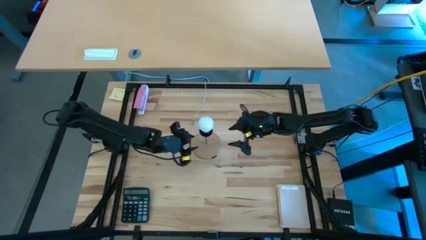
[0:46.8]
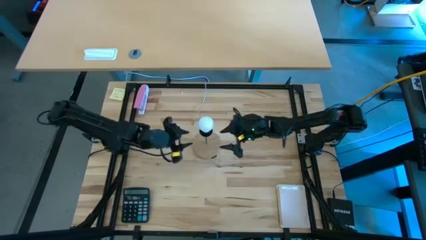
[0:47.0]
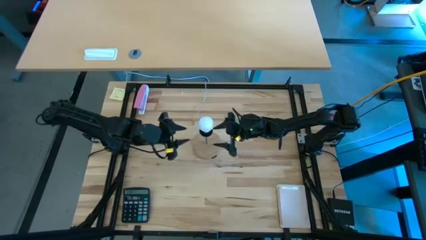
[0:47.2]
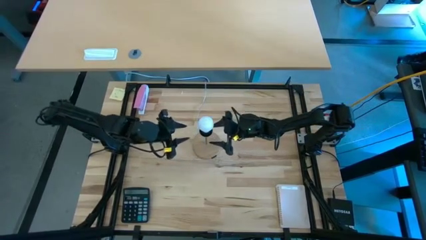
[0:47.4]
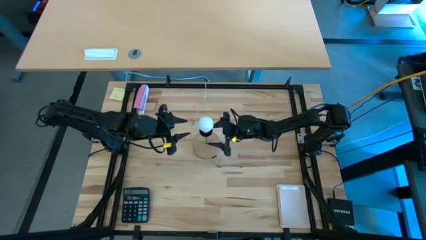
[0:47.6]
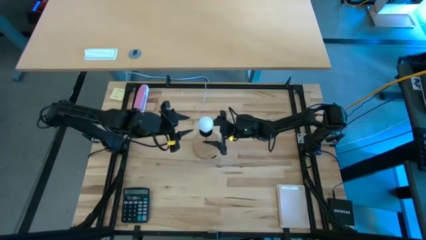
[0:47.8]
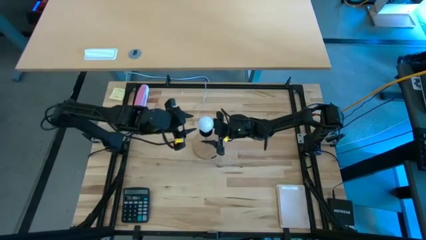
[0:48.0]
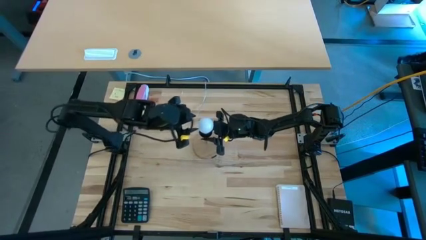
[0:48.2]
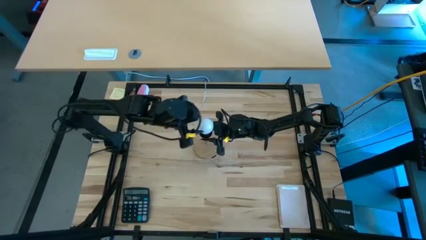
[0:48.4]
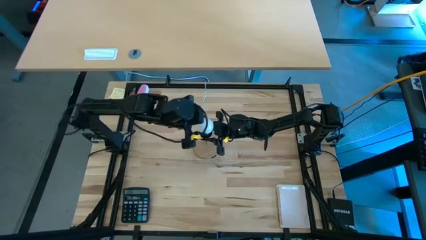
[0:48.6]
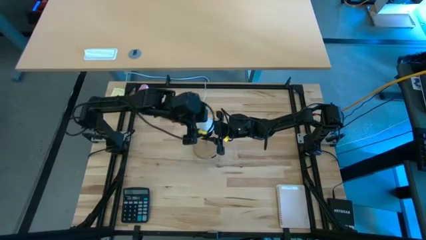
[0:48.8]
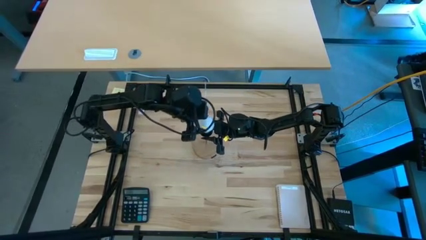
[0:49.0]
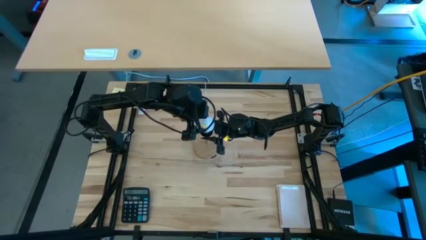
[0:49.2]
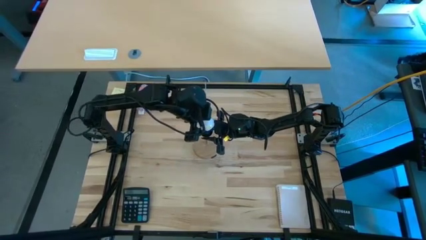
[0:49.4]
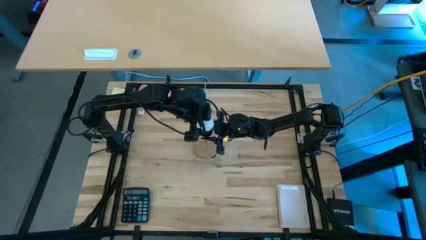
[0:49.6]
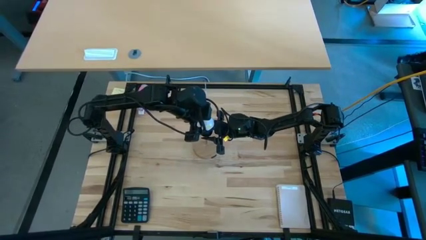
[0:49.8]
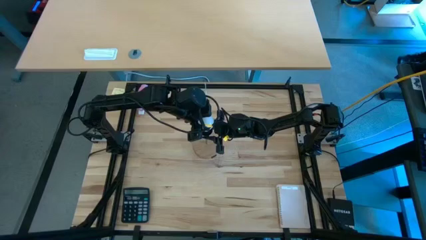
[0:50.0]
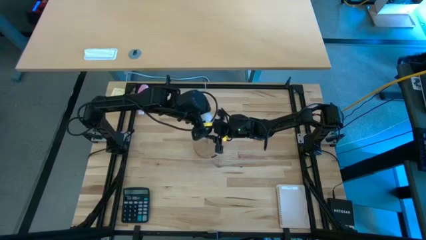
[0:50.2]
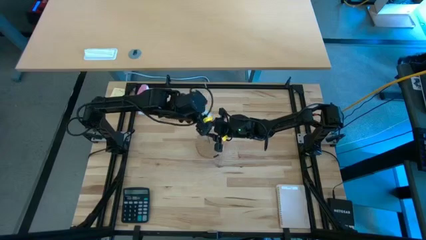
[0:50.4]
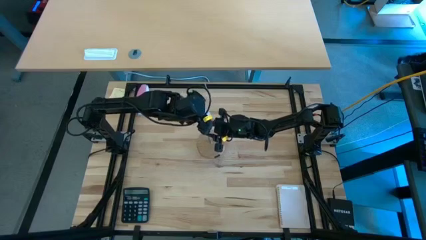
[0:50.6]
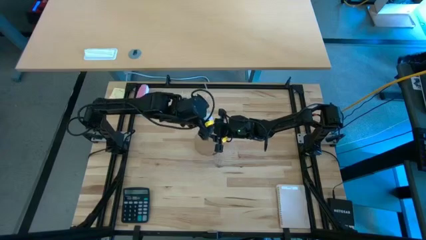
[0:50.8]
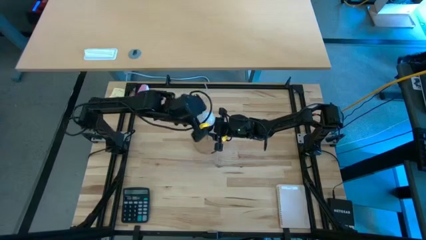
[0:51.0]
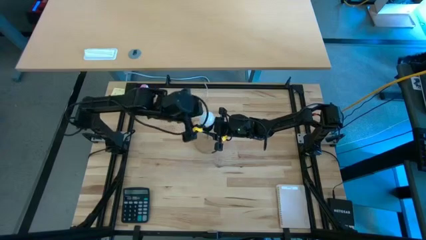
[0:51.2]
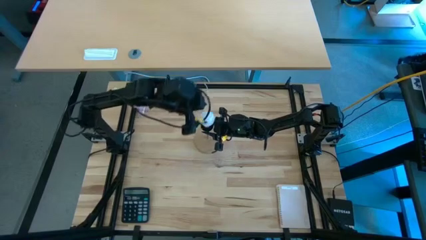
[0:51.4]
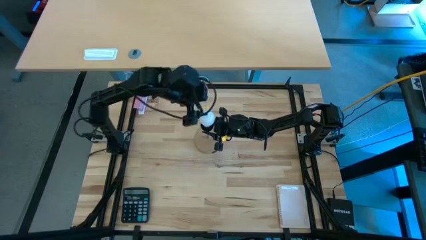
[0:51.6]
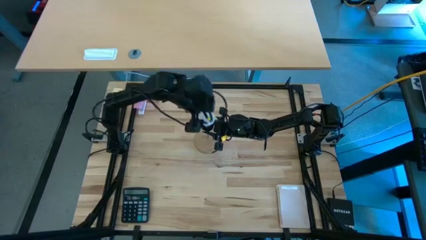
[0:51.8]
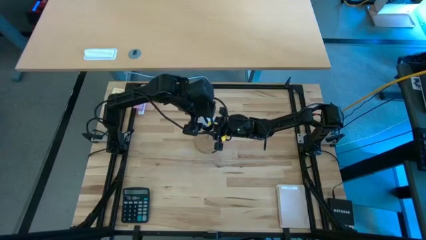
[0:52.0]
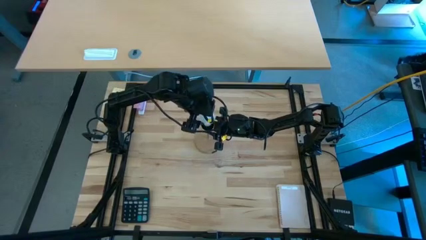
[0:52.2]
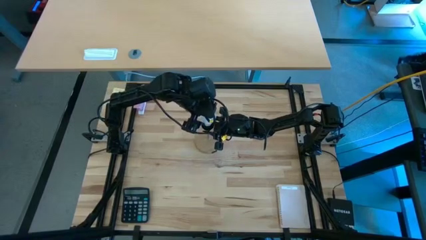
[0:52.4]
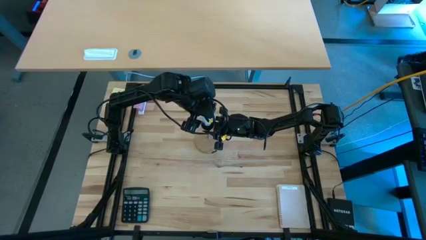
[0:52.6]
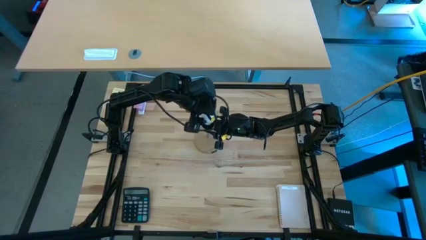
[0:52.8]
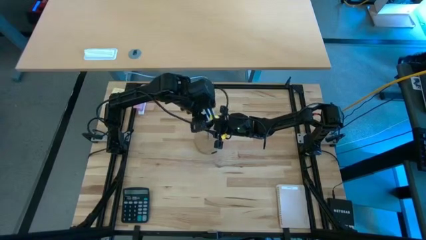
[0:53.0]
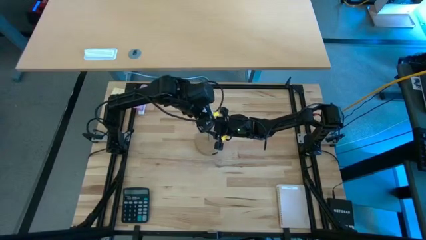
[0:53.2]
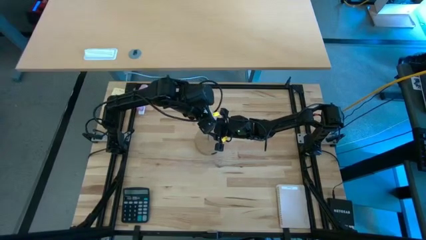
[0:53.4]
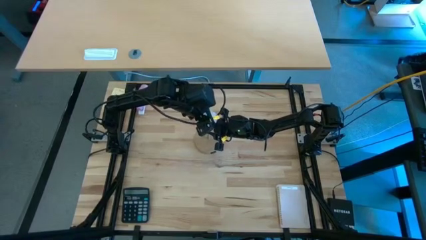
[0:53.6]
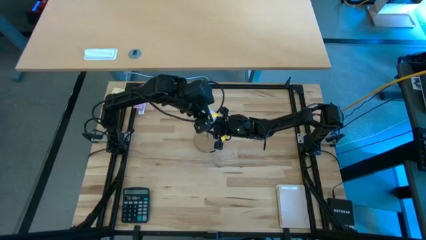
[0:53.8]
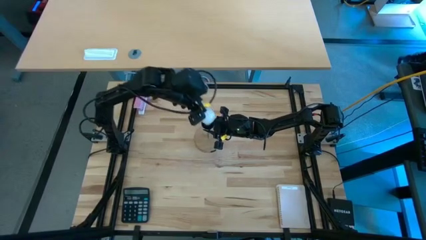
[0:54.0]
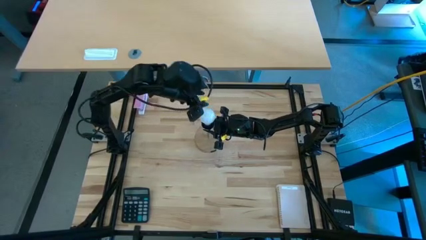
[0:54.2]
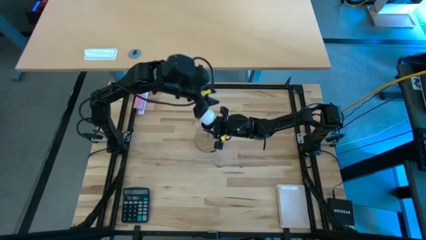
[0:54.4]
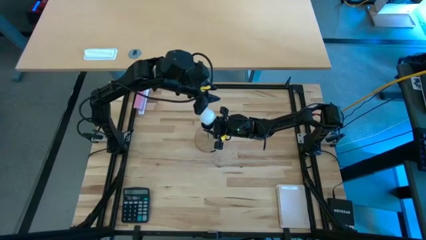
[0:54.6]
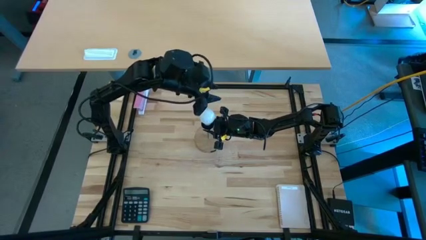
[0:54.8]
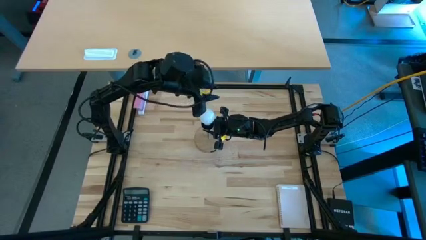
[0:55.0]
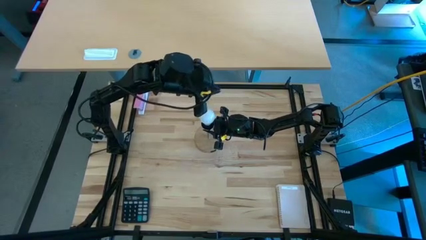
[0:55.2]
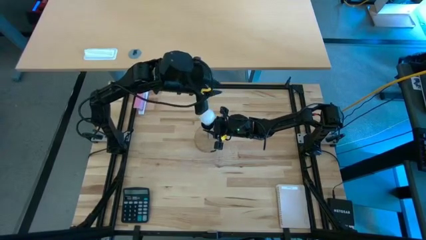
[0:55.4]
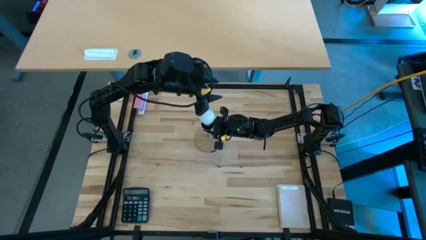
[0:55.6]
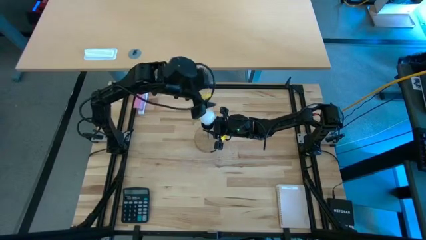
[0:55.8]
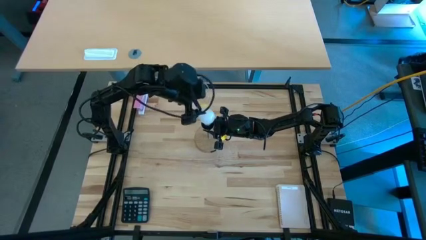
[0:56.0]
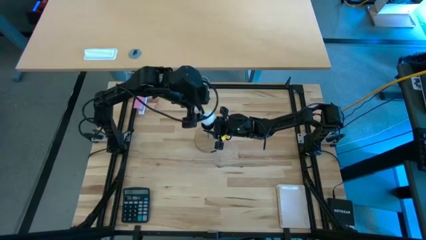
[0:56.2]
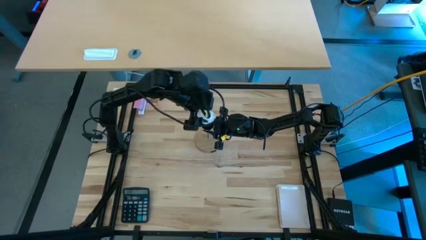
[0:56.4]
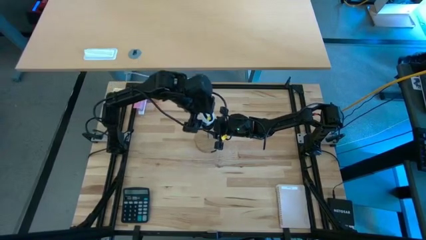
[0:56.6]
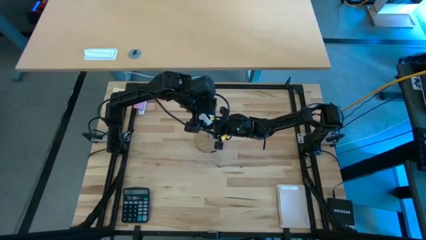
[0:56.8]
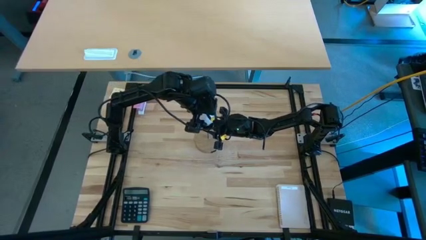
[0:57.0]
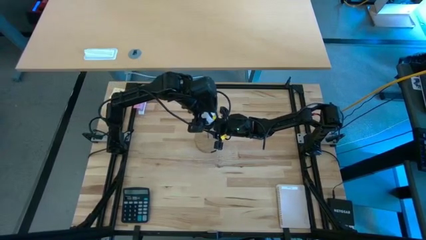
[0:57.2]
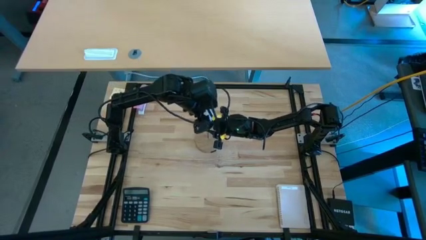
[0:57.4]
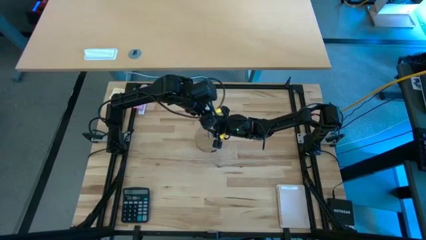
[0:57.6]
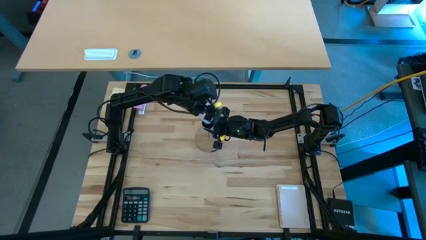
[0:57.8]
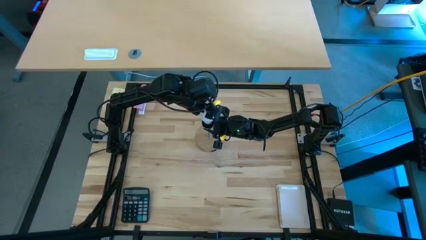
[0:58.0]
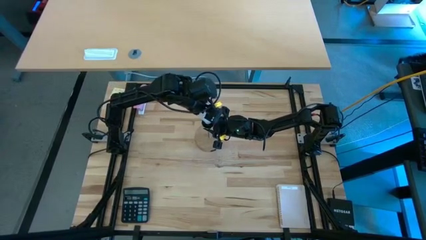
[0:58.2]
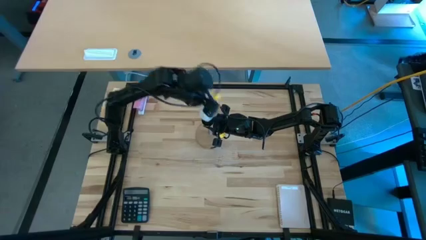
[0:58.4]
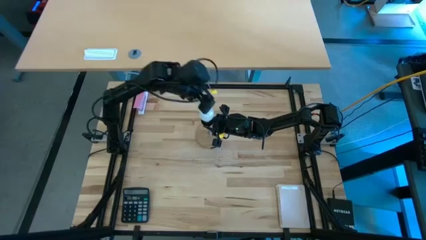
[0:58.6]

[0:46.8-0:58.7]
Task: Screw lightbulb
Remove the lightbulb from the lamp
